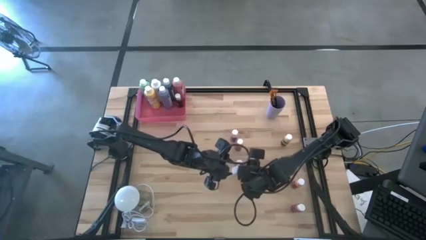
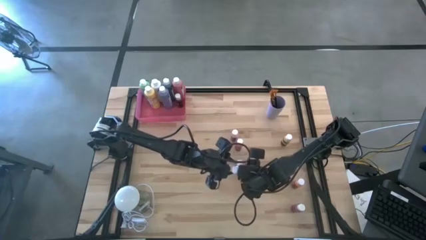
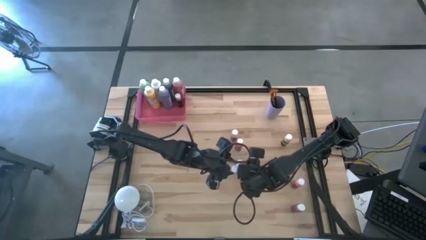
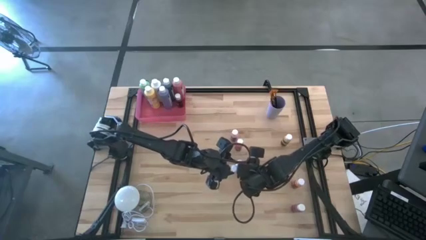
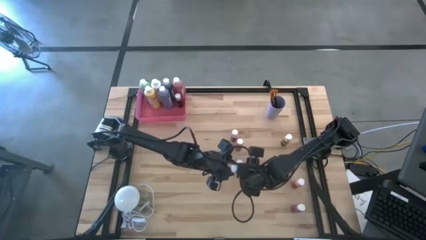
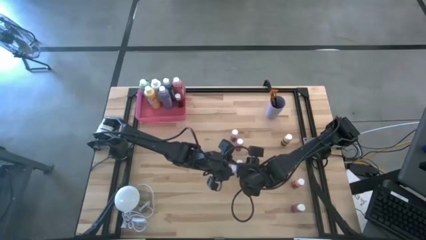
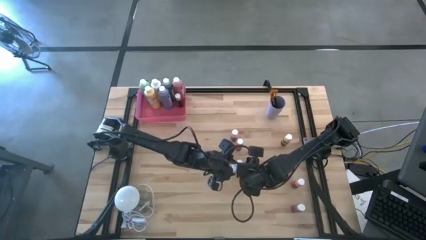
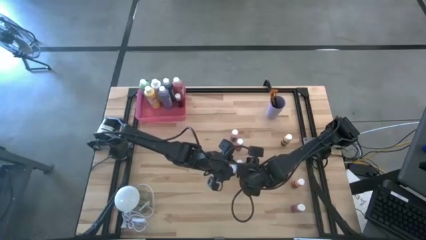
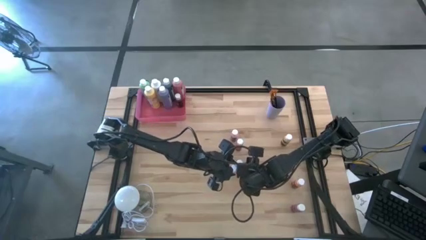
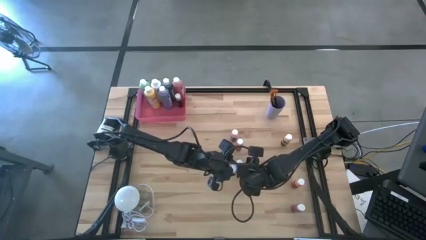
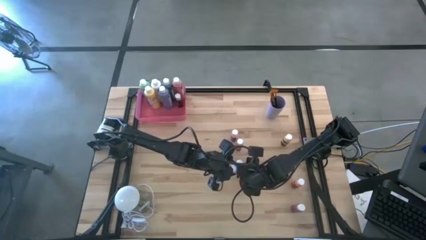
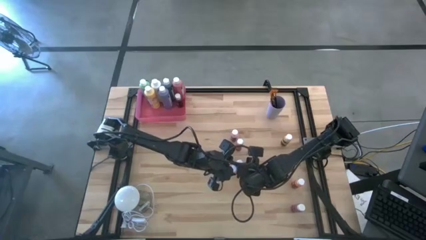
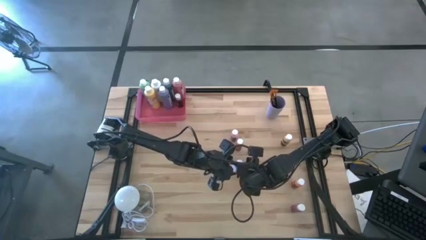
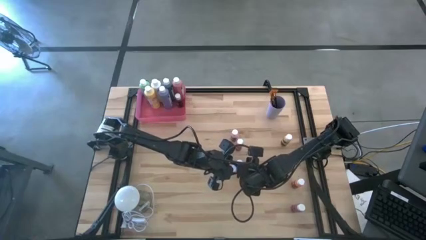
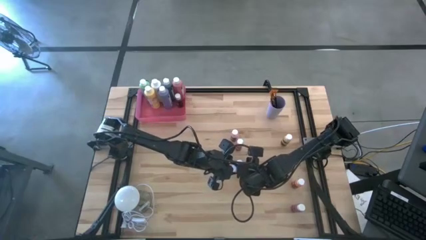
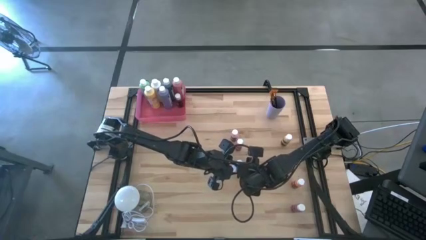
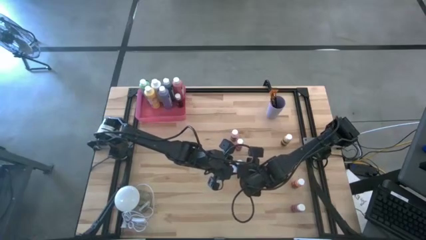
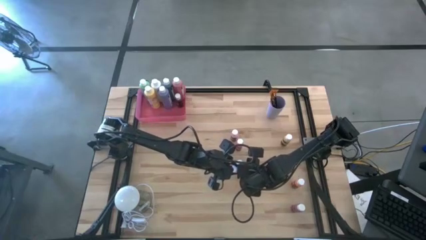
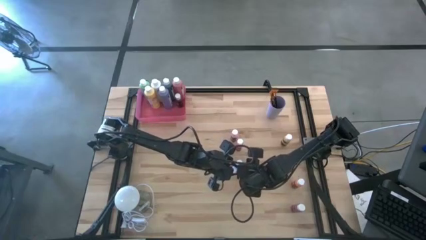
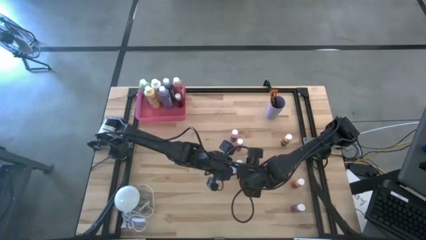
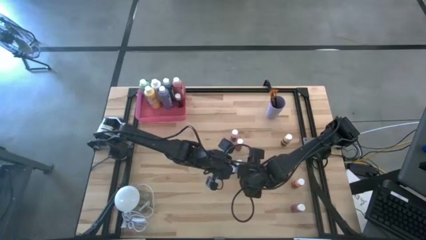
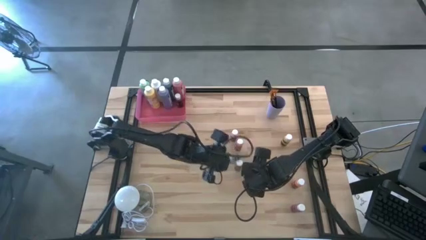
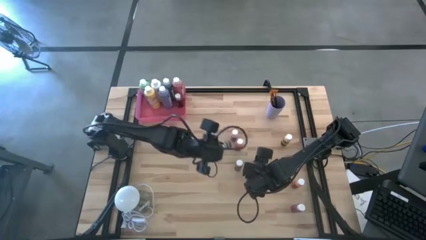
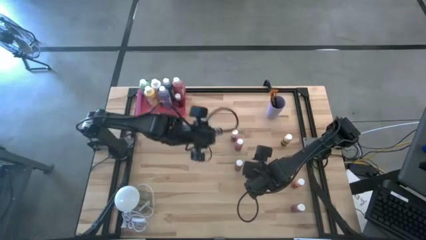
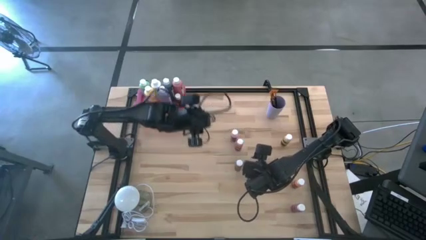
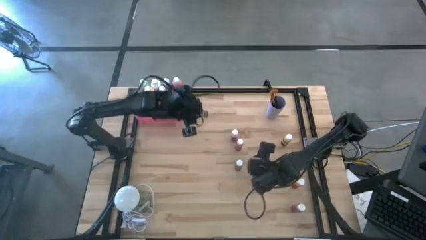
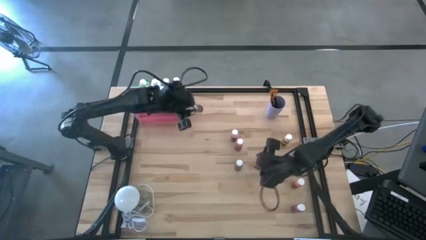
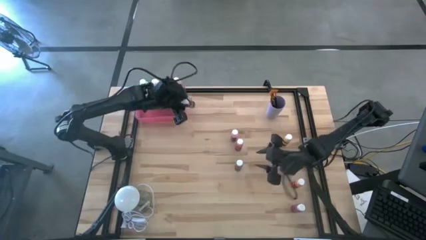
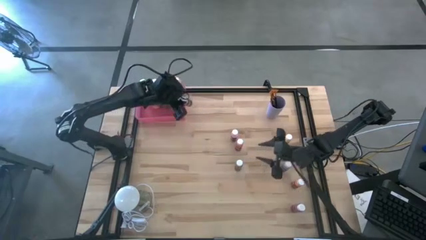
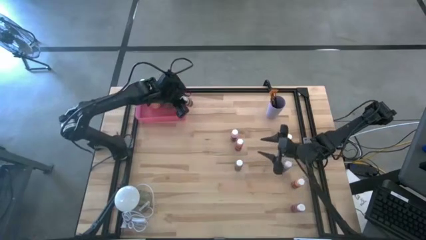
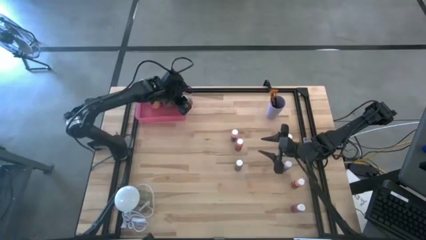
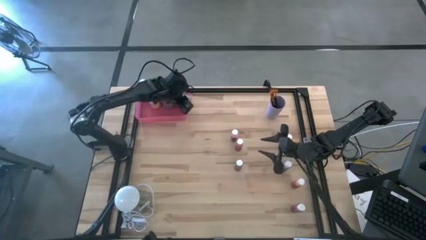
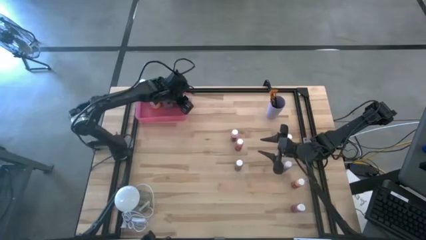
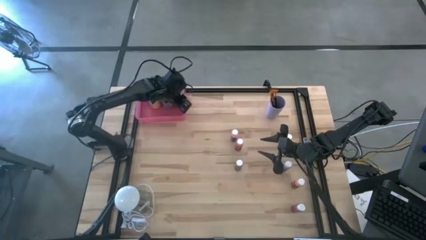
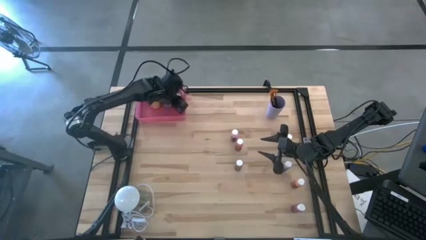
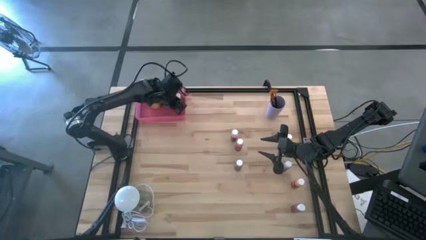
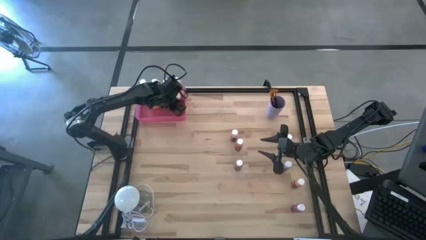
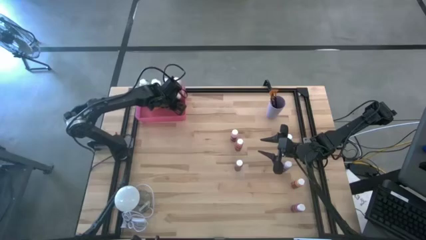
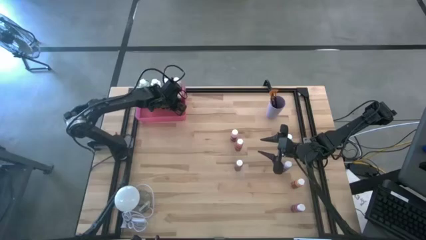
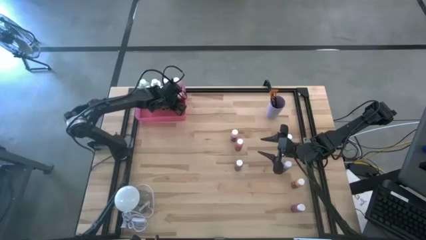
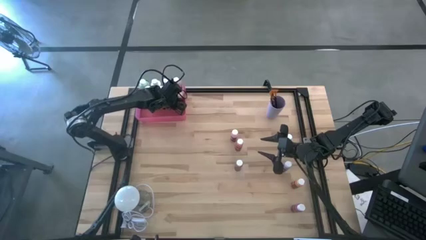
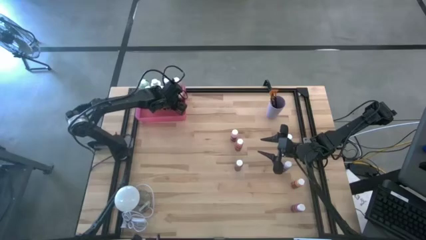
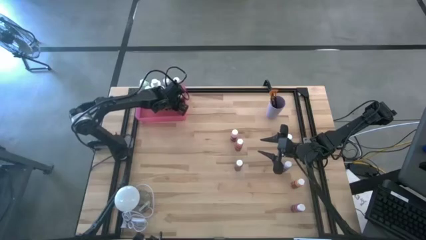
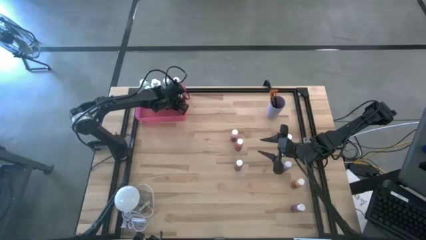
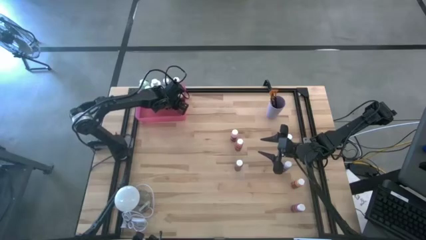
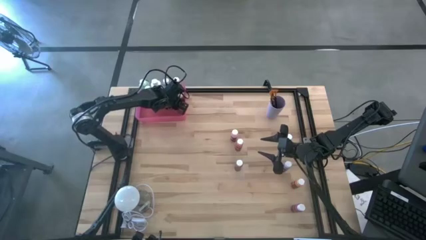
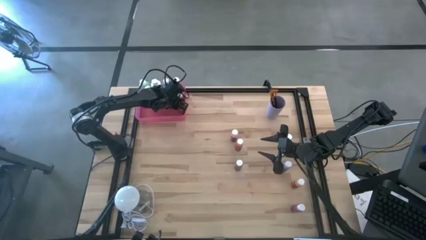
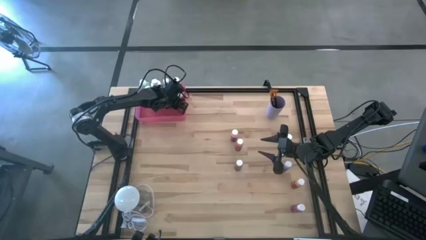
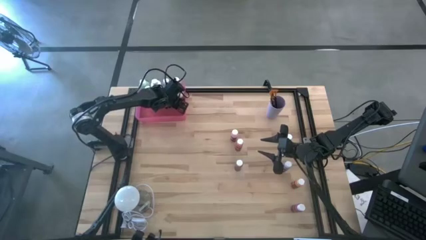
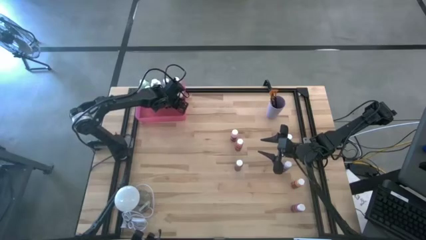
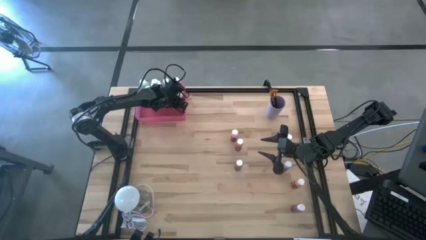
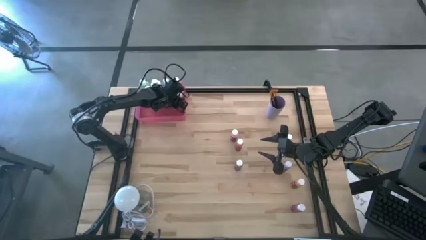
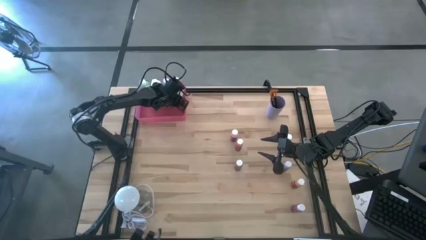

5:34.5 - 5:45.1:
Task: Pick & Place Paint Supplies
Put the small white paint bottle into the pink bin
